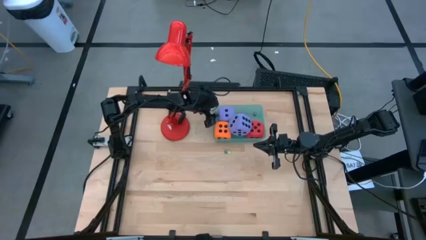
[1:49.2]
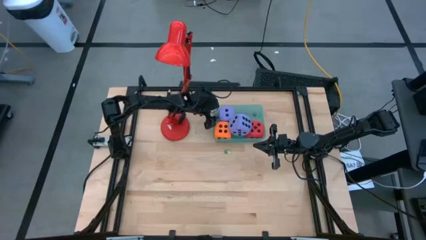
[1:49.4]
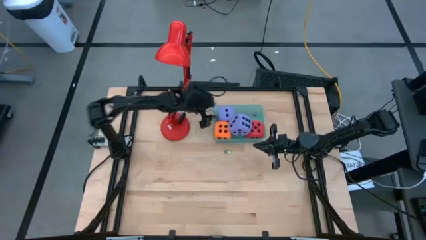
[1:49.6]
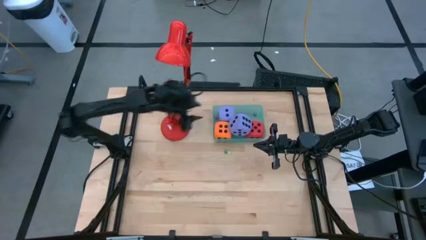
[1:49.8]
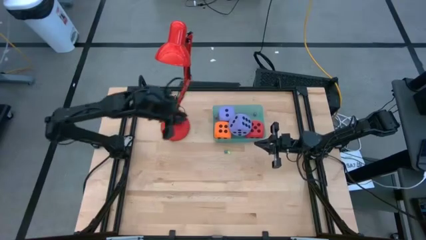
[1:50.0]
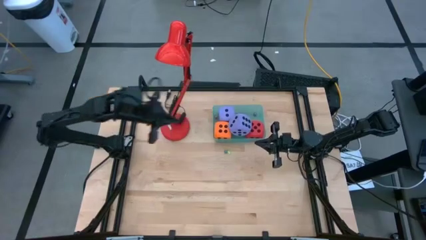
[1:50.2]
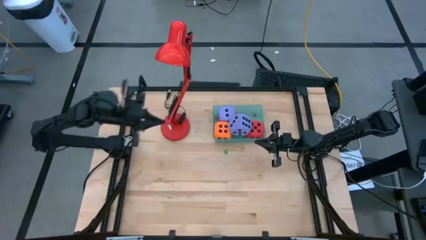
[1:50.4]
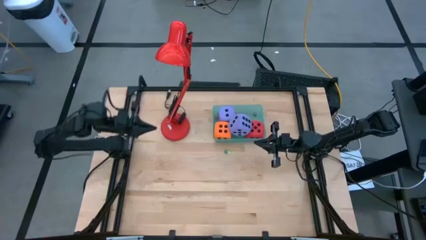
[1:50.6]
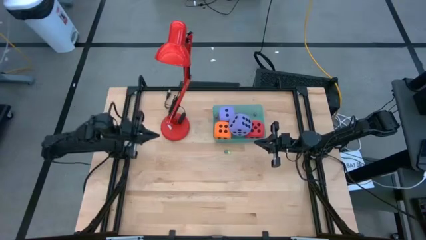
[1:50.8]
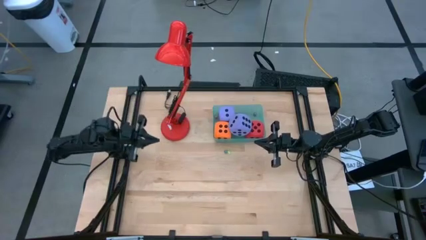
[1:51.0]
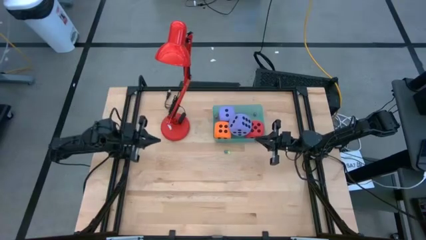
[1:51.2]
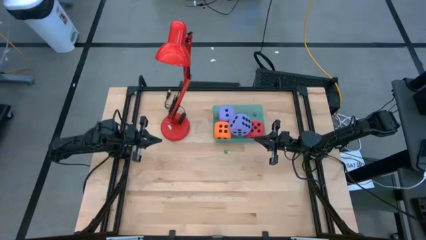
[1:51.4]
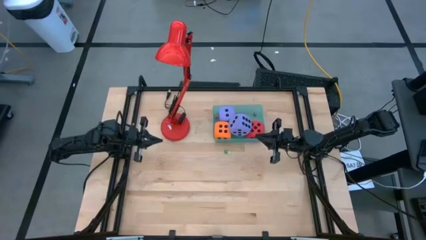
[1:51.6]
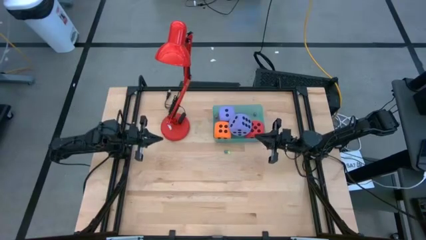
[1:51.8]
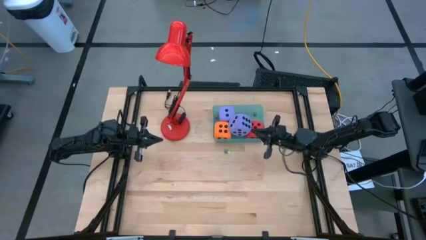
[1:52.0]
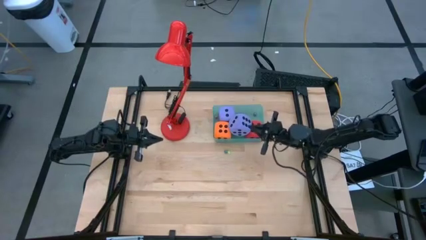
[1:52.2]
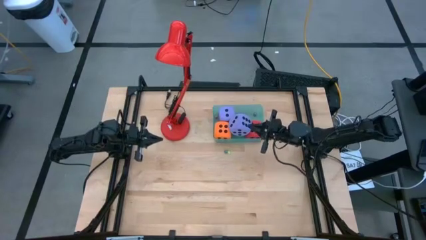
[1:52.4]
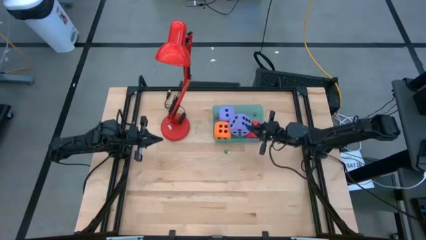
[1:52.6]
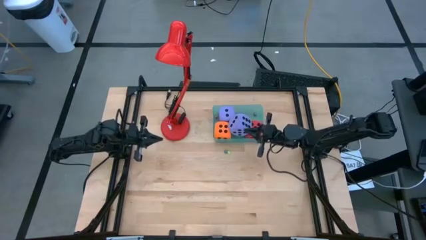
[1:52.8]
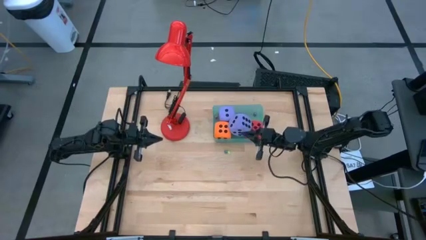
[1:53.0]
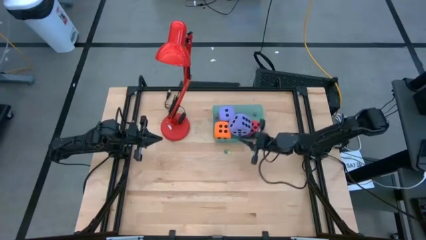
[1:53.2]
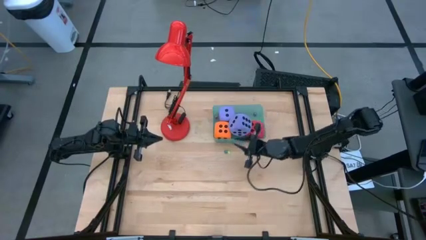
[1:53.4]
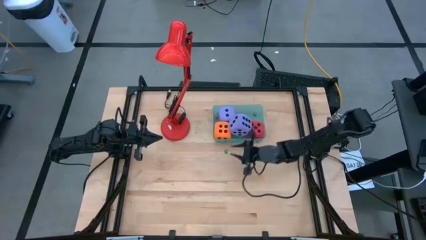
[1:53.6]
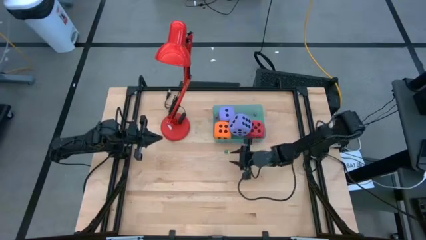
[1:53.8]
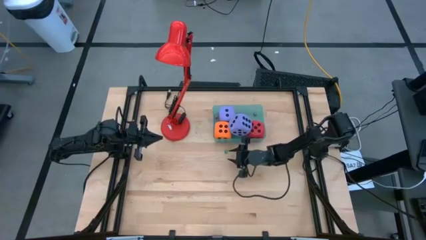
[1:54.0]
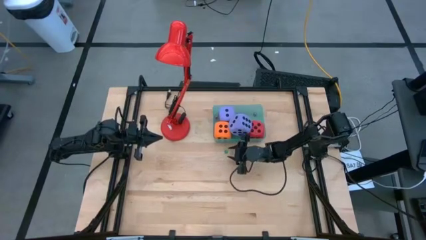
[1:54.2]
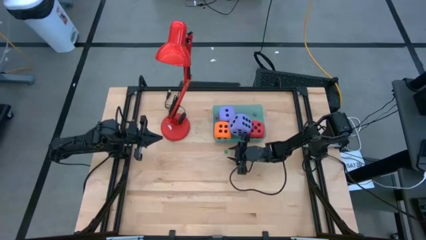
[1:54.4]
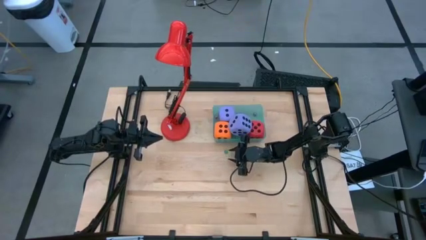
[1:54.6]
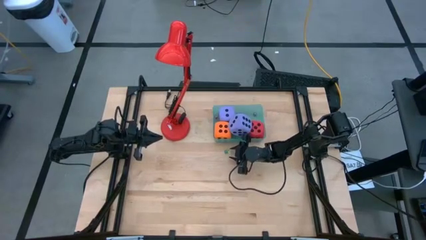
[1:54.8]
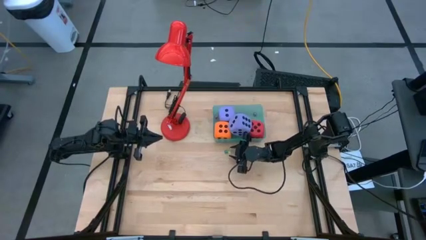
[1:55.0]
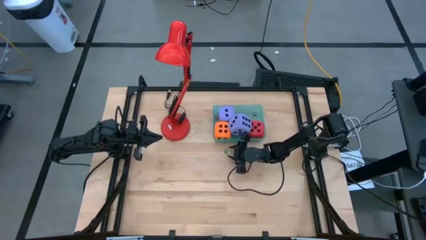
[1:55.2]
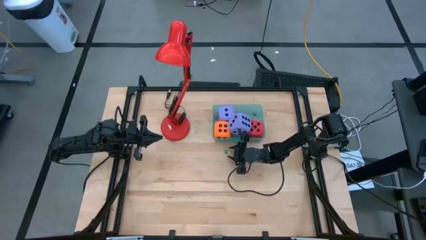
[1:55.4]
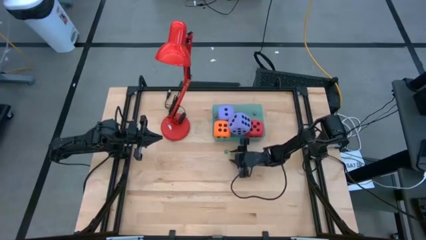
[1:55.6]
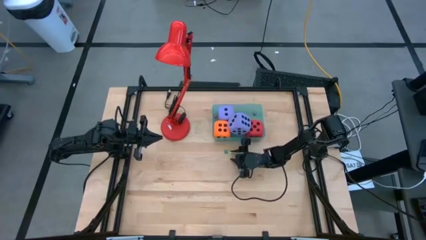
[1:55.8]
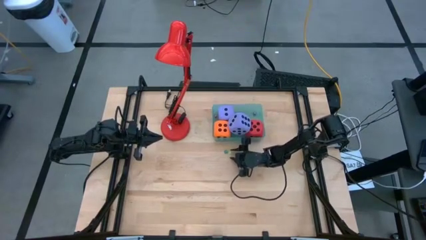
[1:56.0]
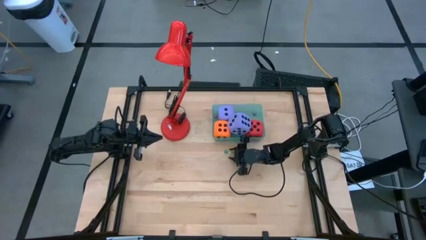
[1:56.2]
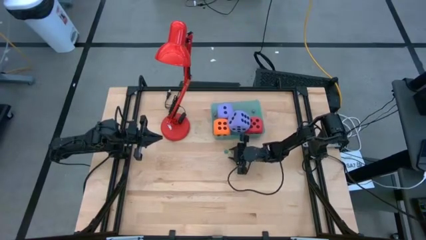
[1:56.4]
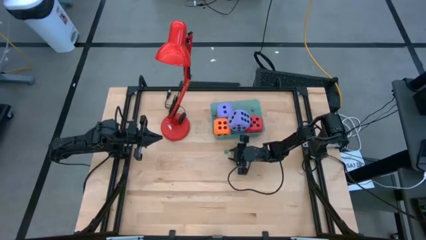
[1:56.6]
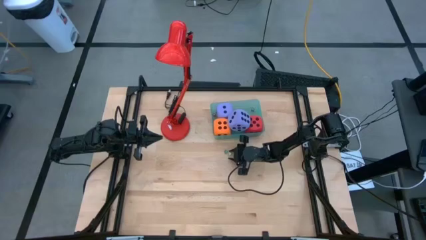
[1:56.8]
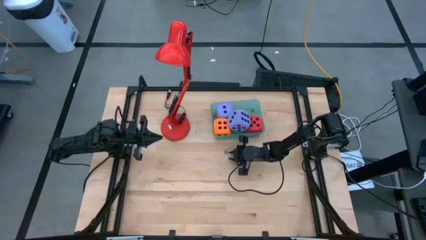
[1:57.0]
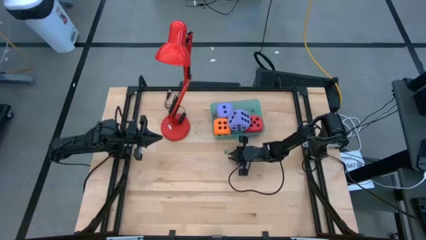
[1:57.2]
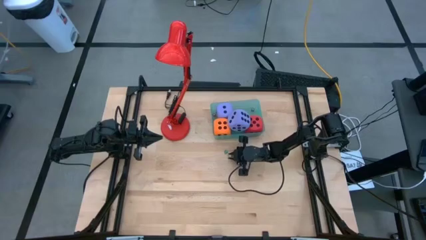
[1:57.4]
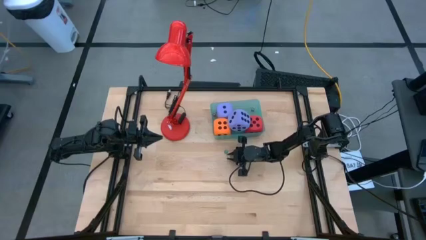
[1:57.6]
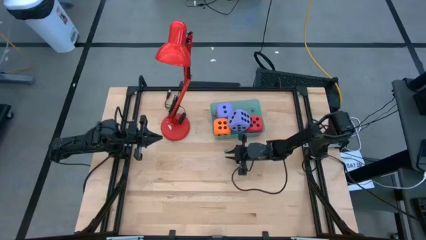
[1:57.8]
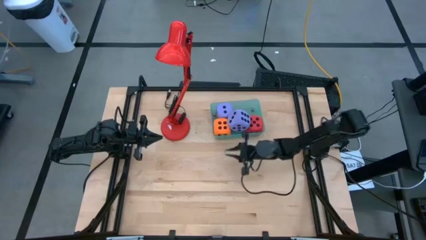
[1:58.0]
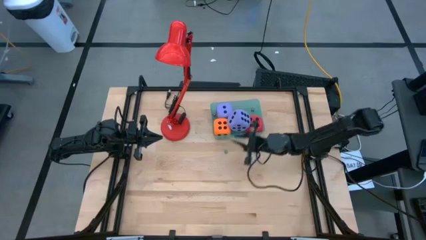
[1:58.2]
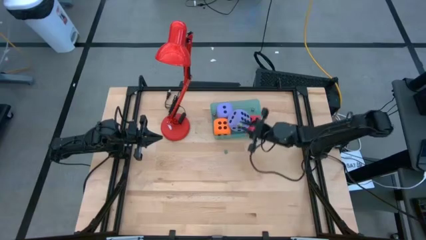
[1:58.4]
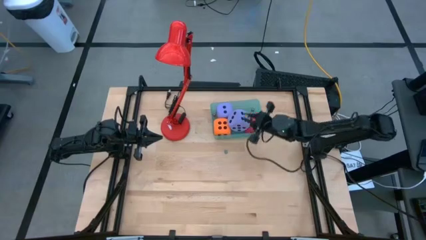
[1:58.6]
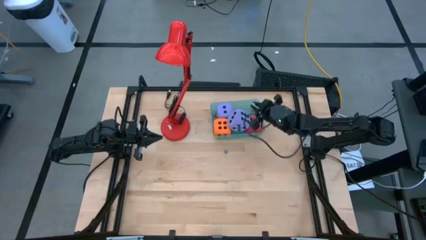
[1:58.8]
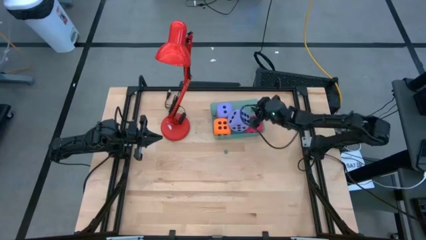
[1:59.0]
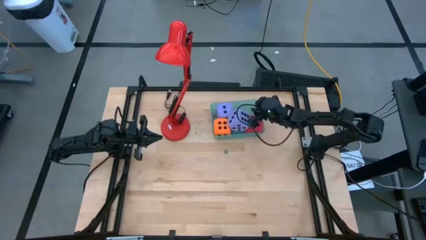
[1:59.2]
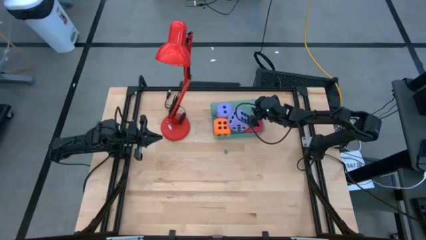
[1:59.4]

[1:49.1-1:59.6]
Task: Pick & Place Dice
Put the small light green dice into the bin

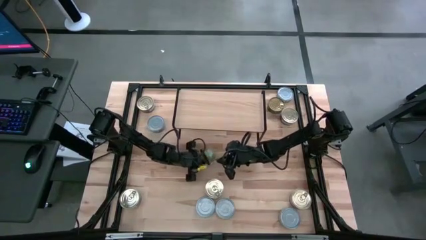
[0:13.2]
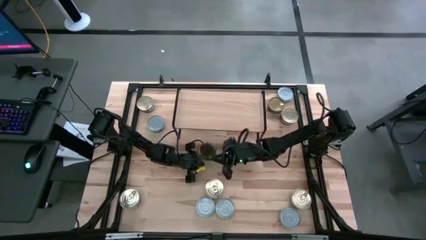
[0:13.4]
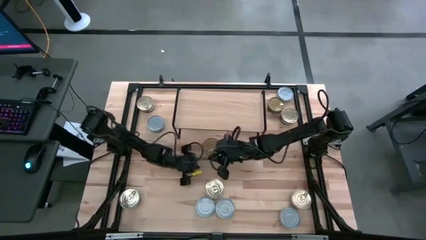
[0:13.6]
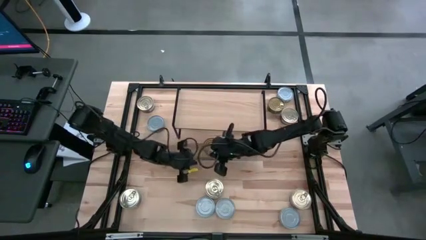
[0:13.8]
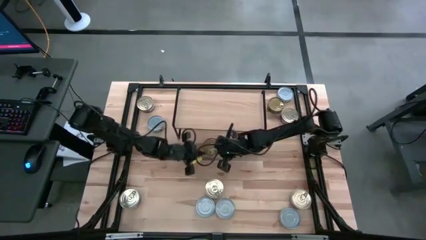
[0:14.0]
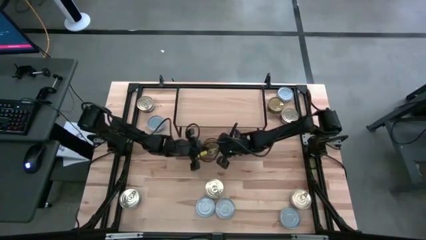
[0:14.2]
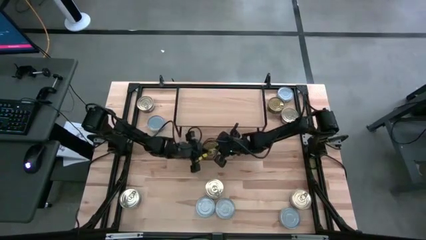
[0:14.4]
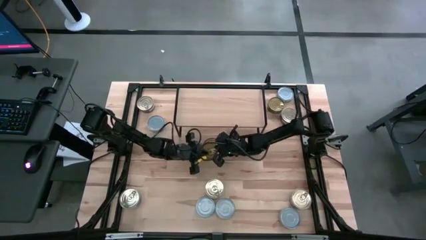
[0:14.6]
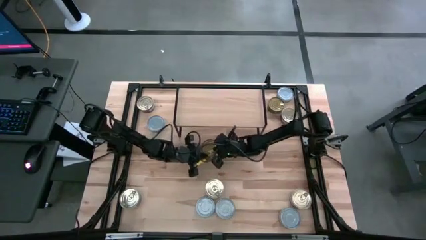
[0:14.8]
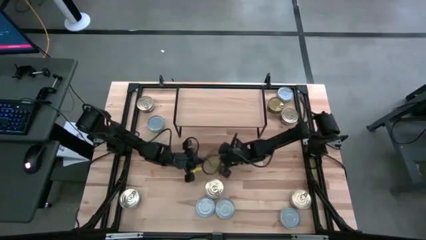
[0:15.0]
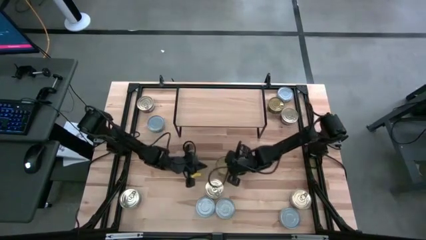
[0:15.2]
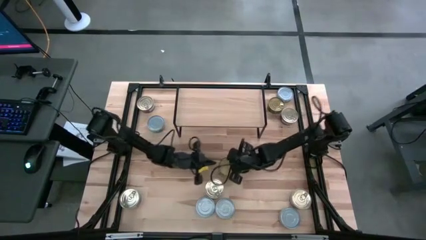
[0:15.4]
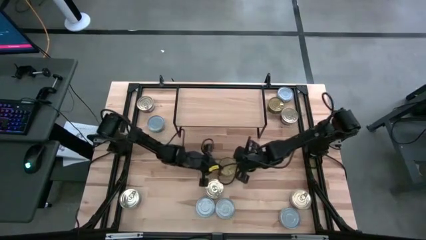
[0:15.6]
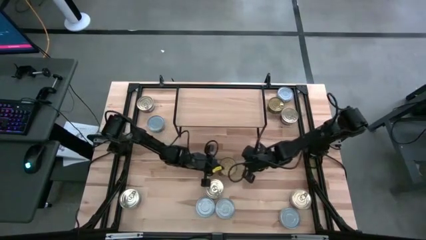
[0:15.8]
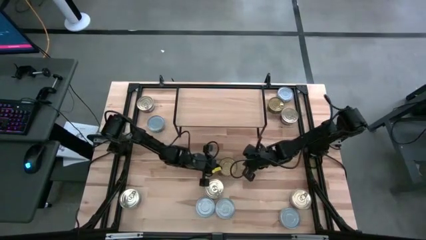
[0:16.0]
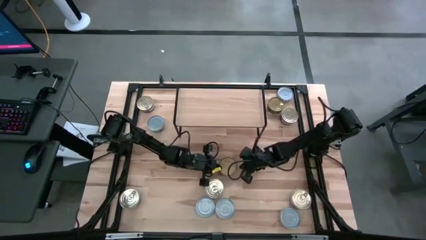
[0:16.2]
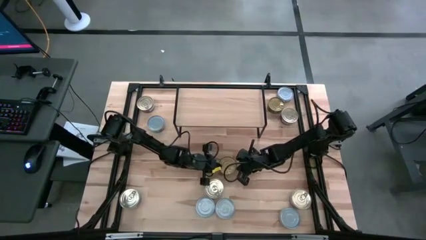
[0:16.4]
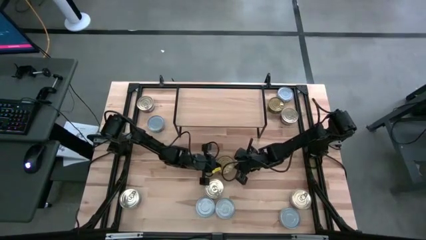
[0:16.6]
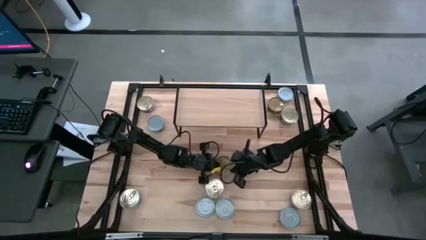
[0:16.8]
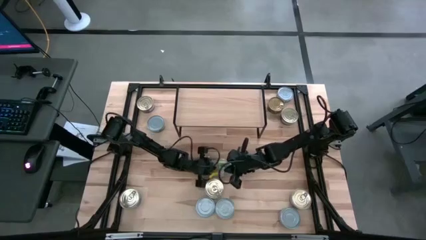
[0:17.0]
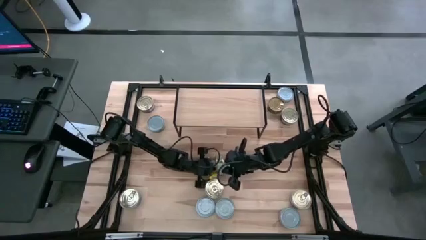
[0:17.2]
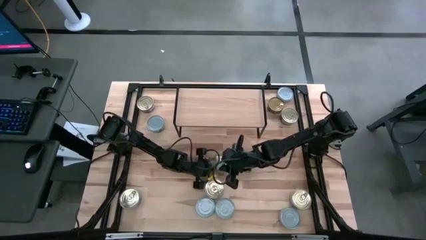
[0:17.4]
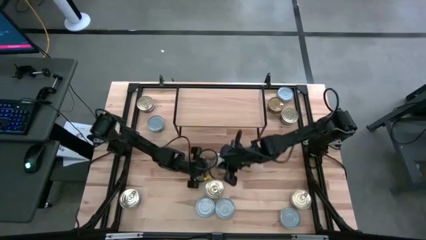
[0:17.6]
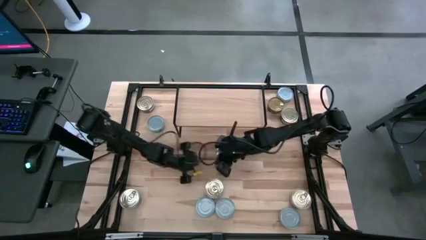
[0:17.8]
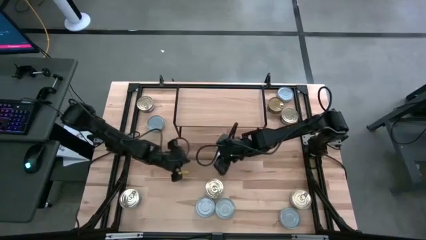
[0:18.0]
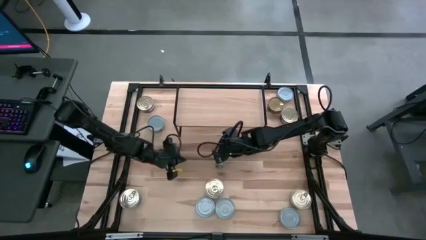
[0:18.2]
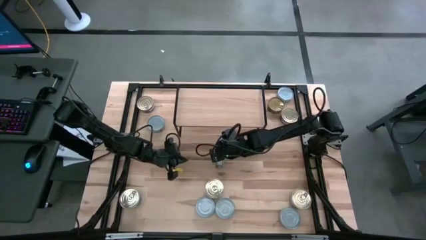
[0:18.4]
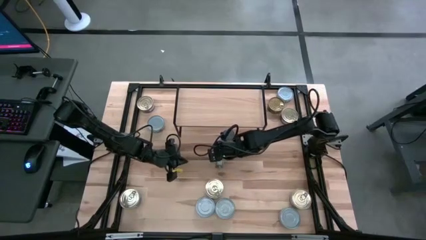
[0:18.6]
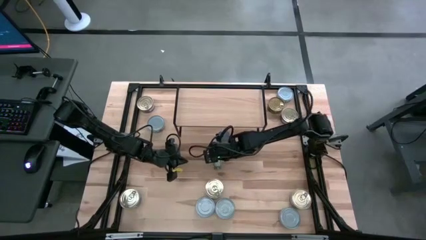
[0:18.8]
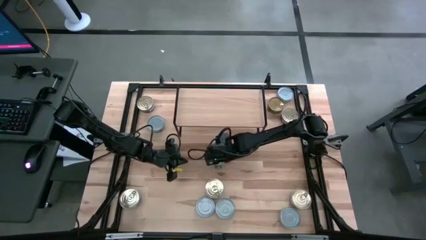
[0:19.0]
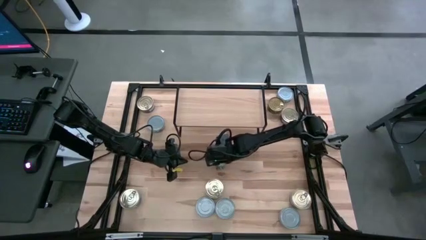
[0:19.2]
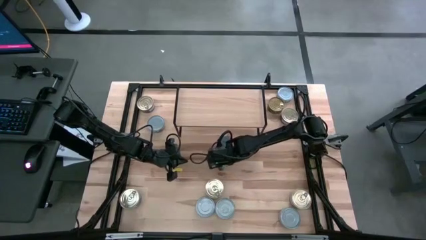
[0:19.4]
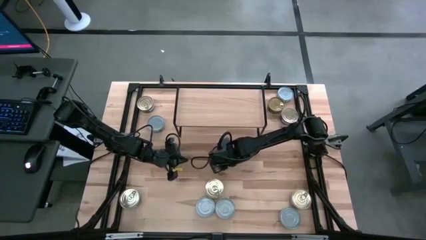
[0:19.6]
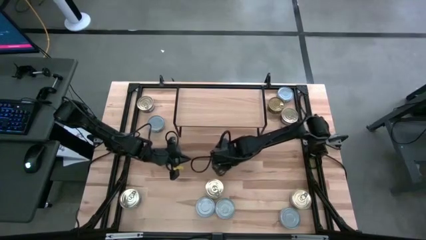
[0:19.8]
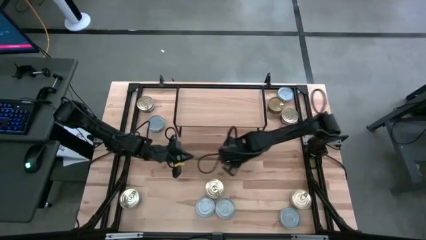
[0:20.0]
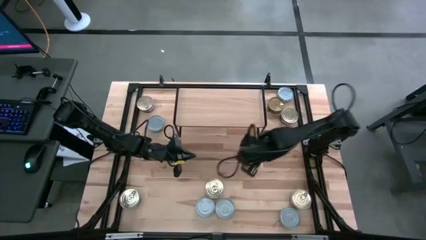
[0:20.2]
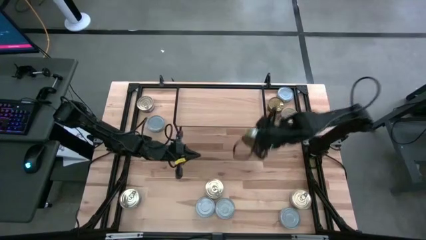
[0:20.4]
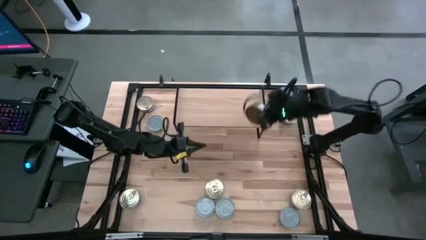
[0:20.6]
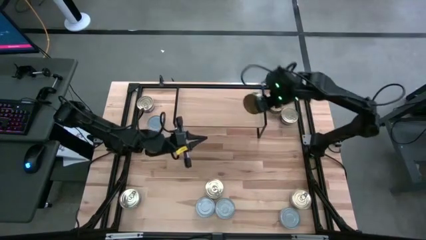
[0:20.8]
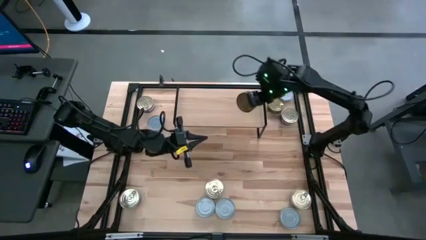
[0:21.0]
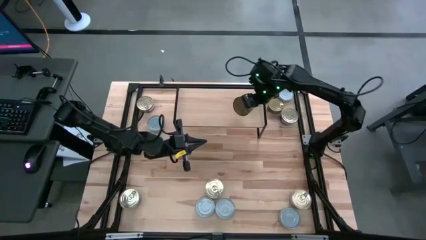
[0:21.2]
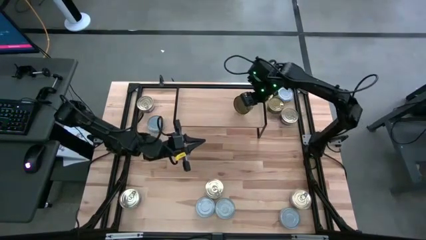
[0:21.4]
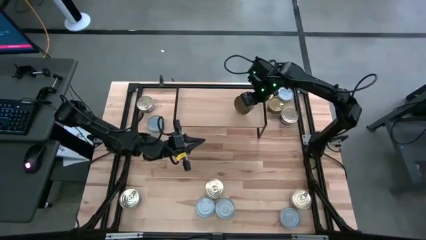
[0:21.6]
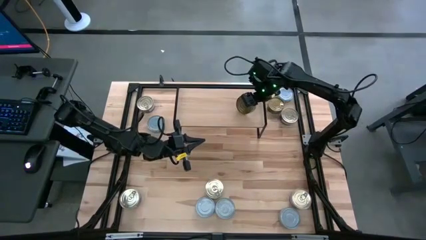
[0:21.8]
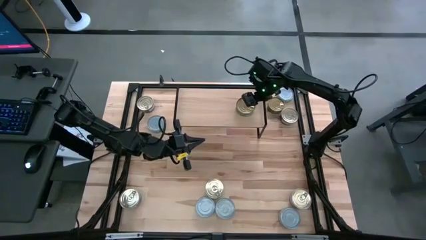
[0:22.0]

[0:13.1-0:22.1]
Task: Stack canned seafood by type on shelf
Put the green tuna can on the shelf
